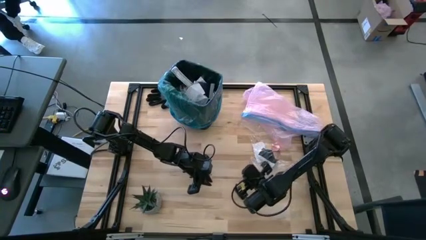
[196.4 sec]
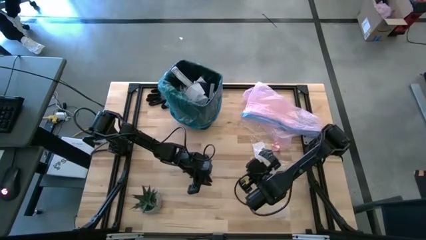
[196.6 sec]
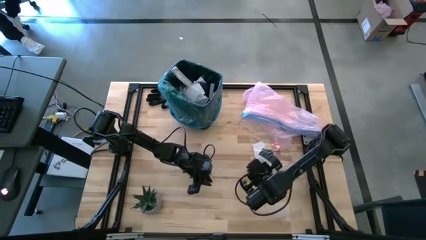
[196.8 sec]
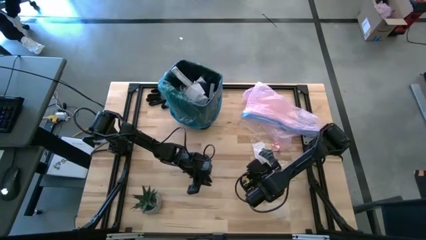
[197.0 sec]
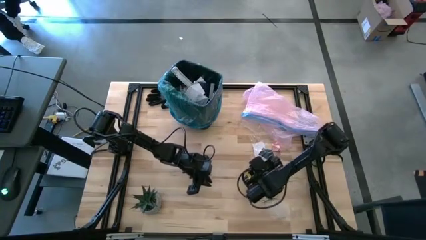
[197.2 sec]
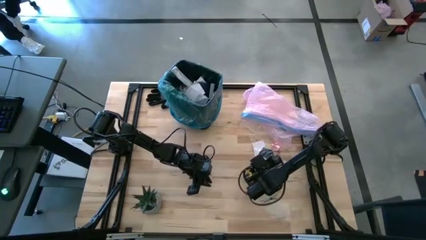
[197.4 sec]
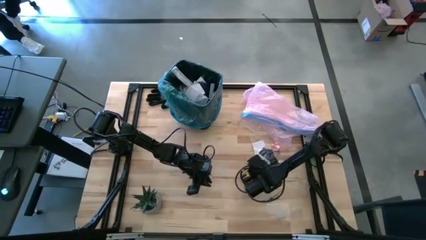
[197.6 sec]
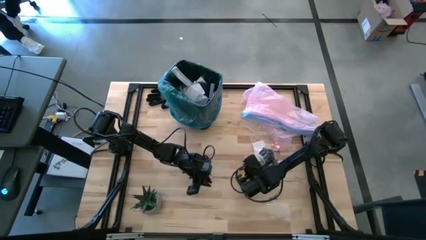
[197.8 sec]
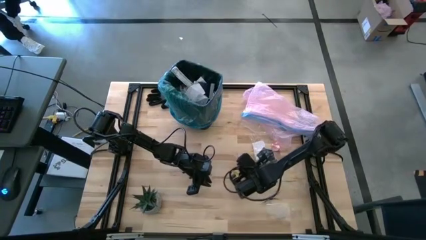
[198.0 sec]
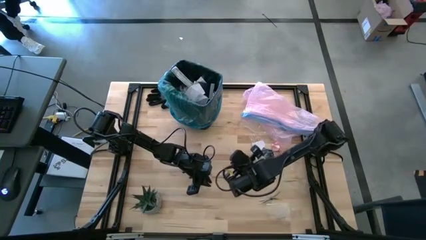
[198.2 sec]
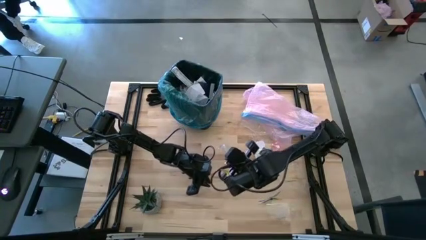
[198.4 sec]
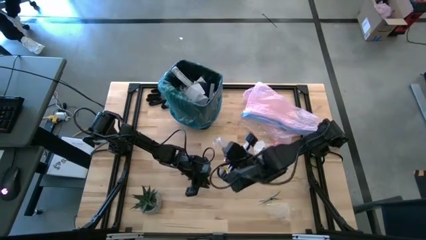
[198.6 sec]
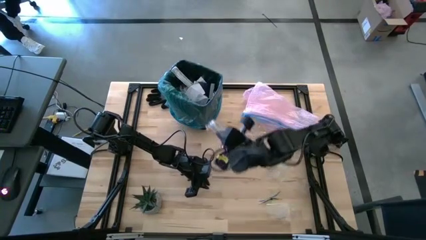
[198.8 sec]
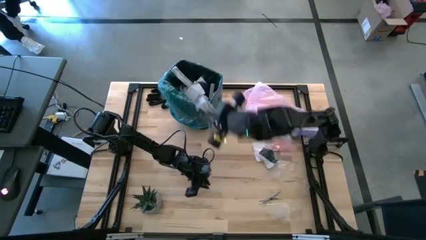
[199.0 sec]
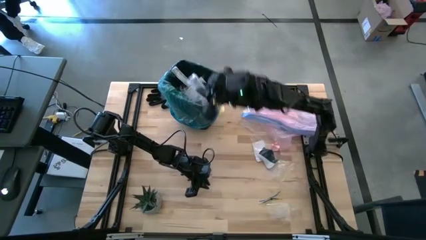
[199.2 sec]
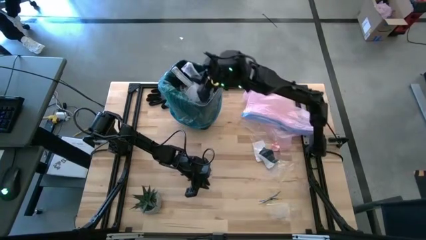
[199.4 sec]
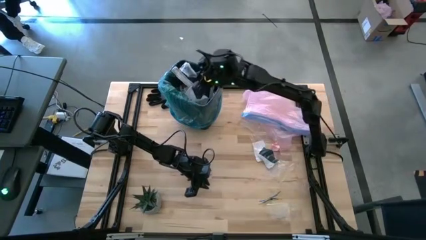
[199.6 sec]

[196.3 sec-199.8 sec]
Task: place trash/remove bag and relplace
Put the clear plastic into the trash bin

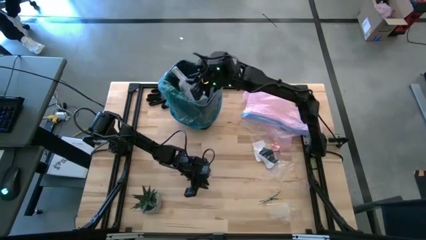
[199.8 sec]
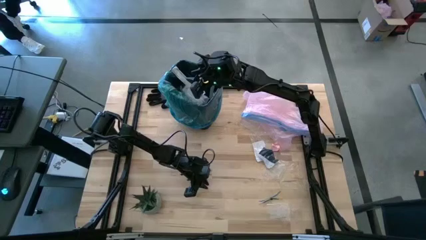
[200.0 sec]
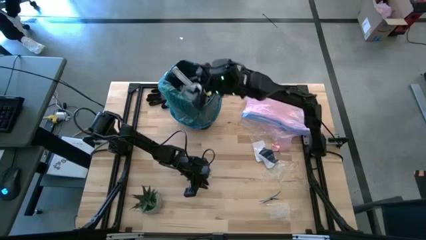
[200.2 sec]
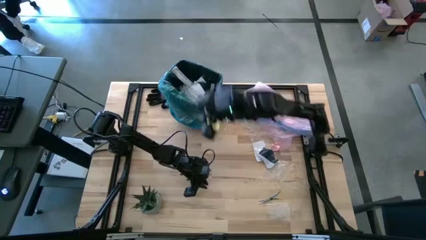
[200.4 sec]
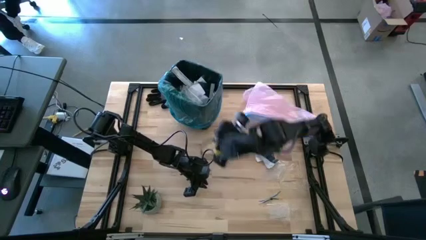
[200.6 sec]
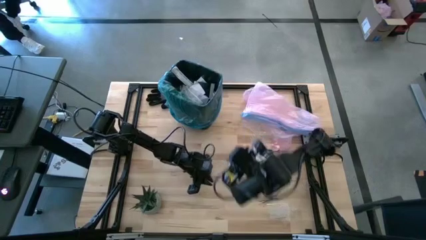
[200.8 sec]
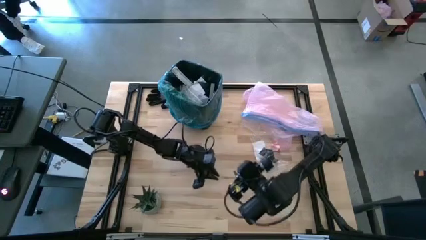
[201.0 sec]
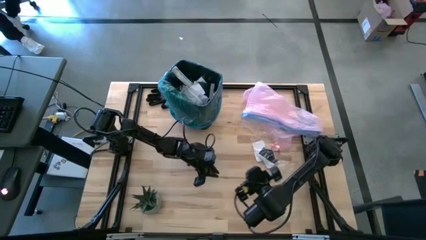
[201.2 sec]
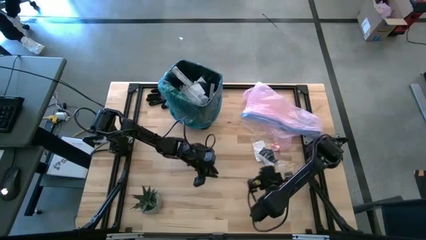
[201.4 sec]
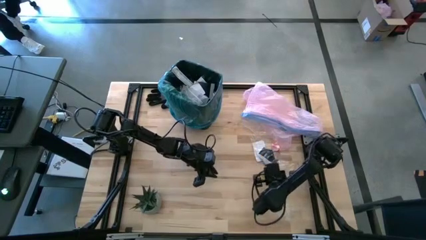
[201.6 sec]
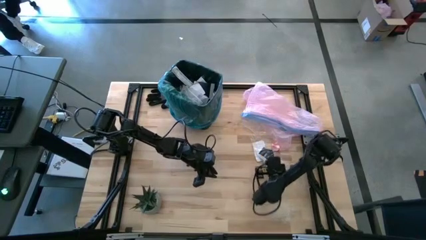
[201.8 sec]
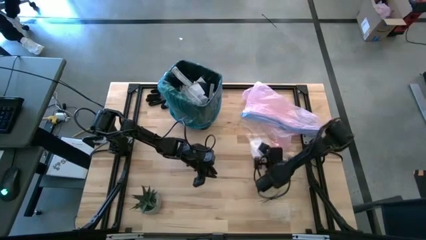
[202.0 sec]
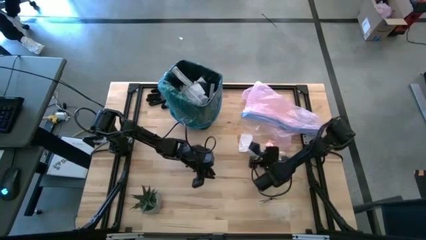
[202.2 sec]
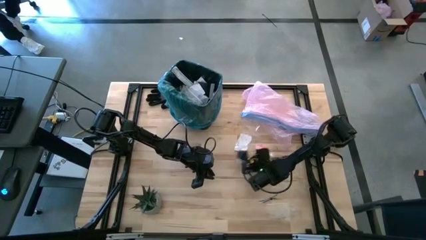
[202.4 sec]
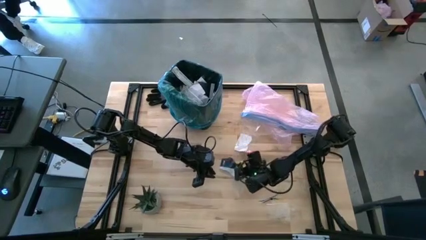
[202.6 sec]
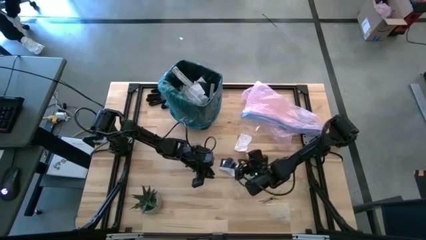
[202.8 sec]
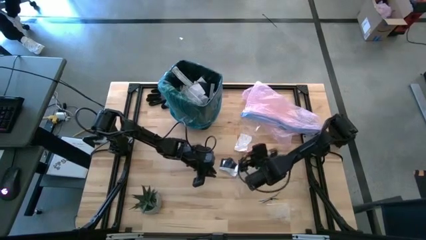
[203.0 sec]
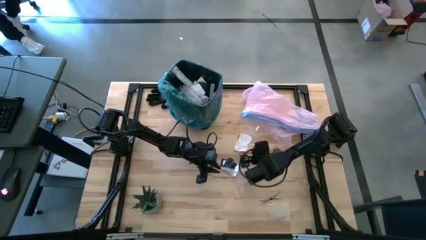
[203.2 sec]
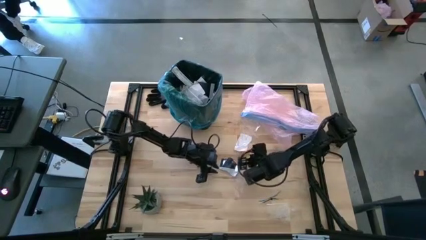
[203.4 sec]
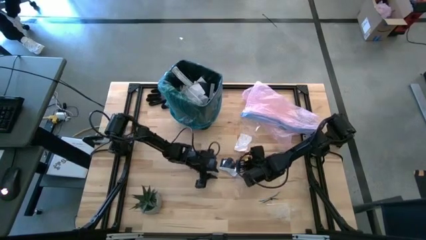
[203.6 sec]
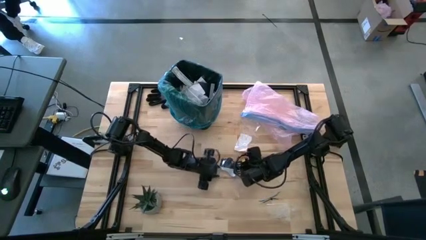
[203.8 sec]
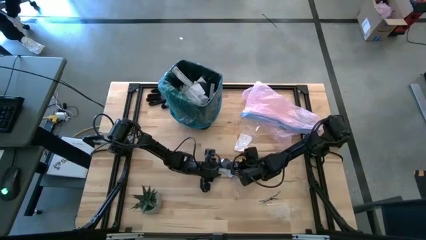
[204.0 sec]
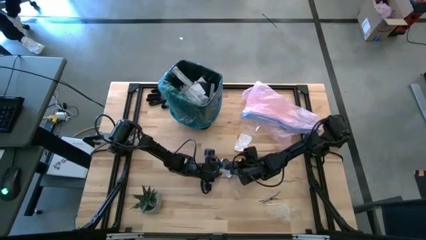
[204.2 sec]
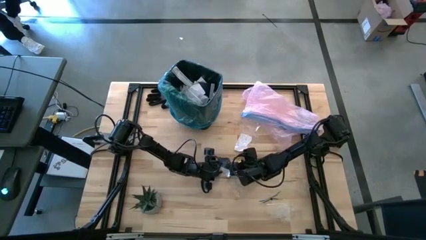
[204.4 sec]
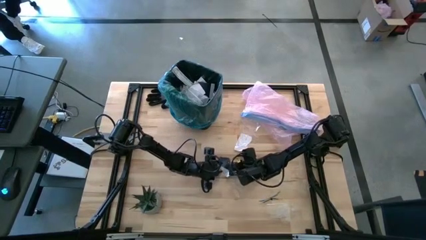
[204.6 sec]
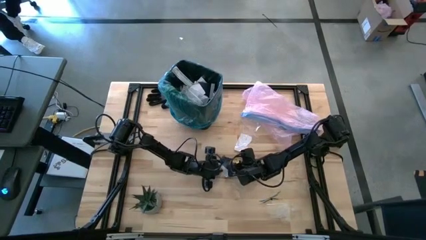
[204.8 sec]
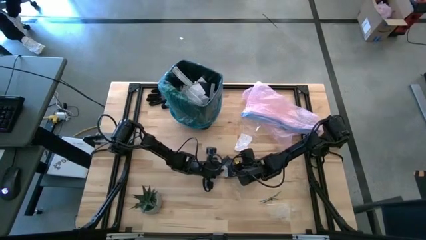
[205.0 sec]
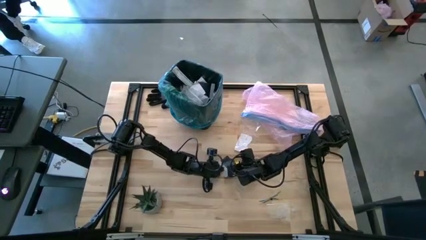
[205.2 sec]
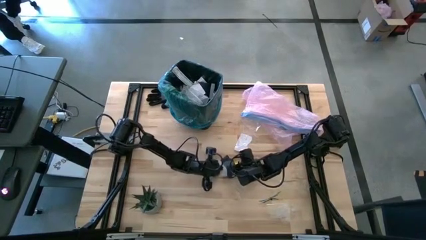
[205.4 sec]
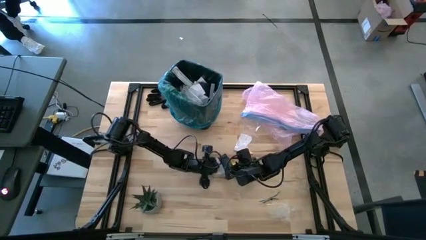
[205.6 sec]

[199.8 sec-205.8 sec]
Put the printed paper into the trash bin

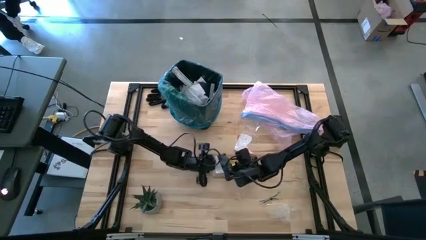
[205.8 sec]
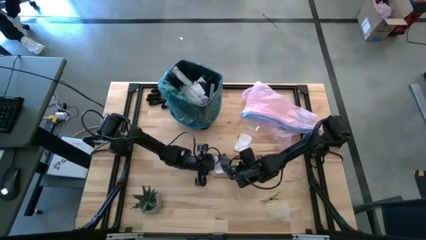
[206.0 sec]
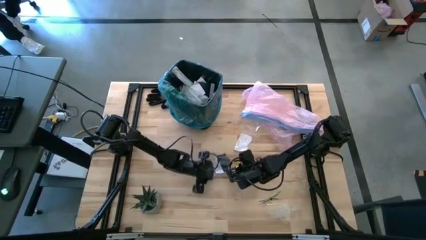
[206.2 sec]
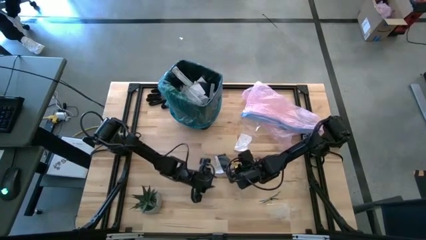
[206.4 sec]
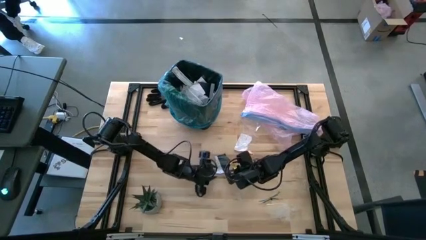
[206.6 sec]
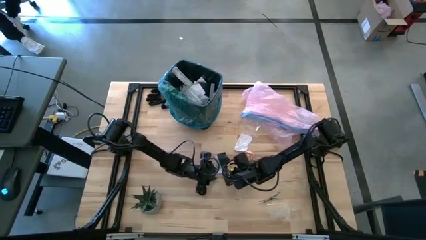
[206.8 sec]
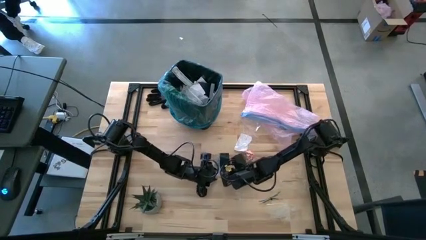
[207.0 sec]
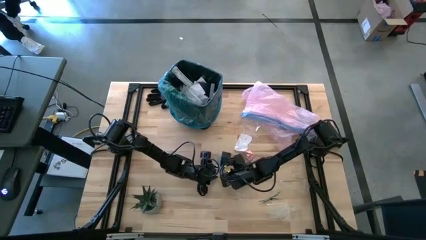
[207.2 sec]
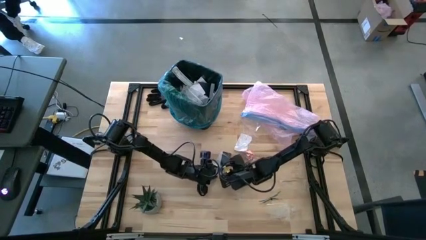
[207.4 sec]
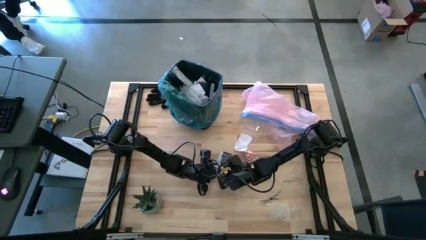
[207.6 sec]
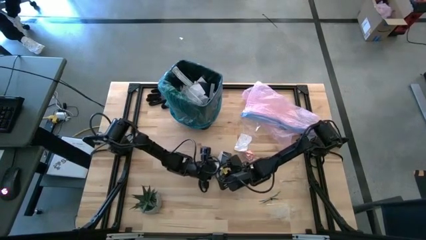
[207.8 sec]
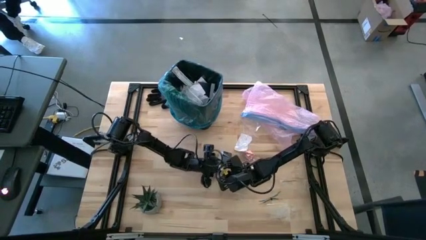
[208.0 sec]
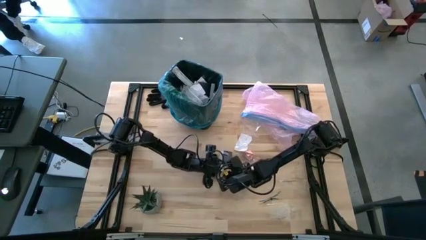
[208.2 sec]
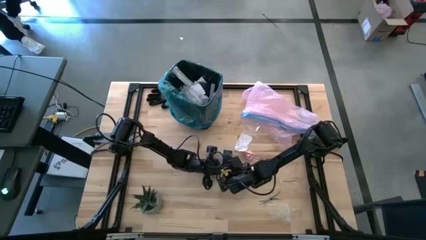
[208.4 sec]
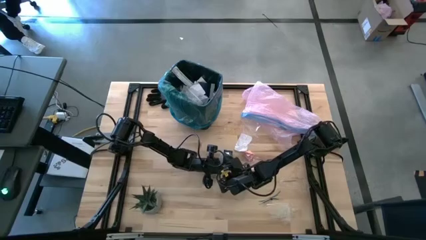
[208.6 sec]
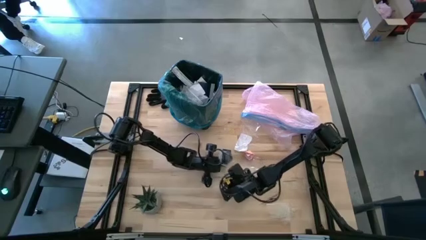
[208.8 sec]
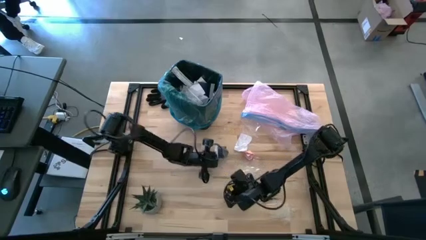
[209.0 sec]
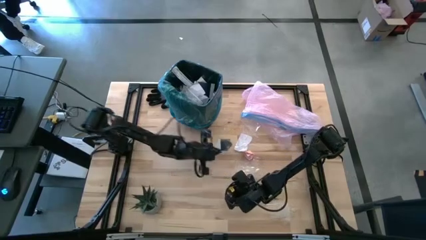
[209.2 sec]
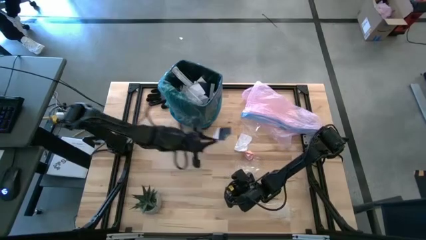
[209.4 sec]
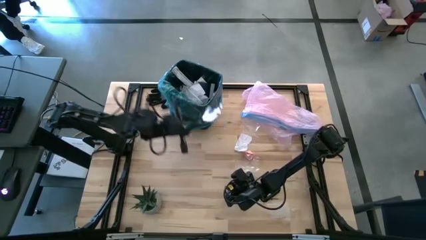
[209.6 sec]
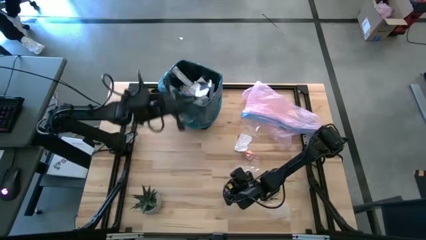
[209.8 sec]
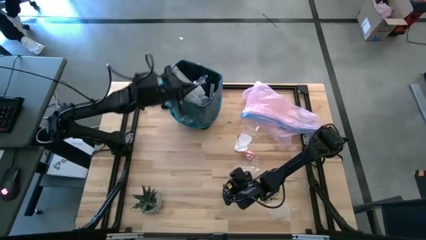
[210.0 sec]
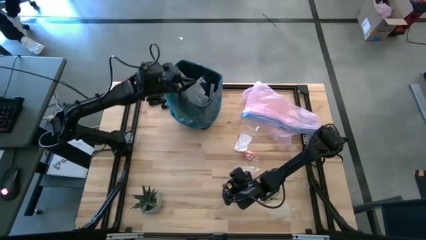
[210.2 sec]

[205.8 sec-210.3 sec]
Put the printed paper into the trash bin
